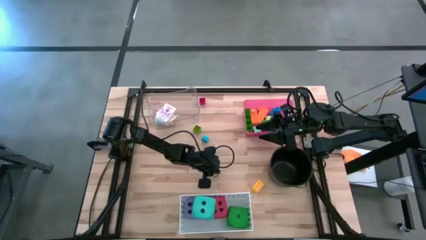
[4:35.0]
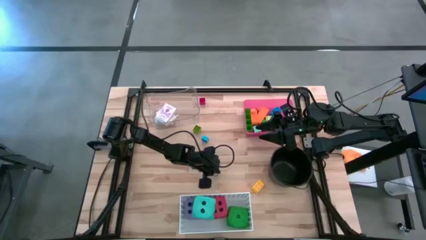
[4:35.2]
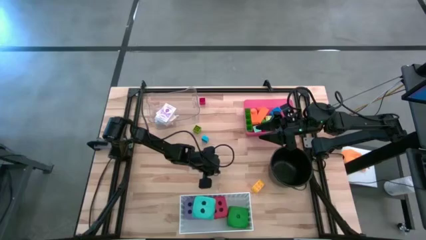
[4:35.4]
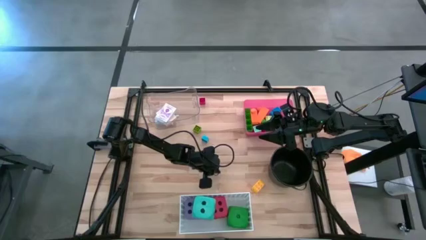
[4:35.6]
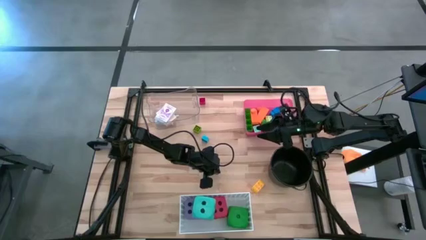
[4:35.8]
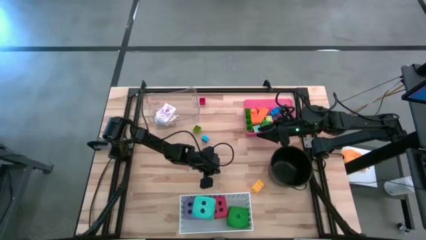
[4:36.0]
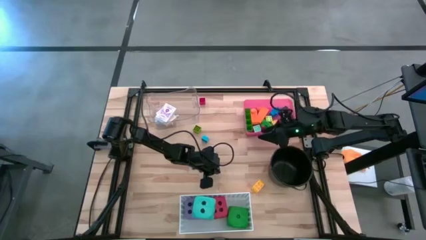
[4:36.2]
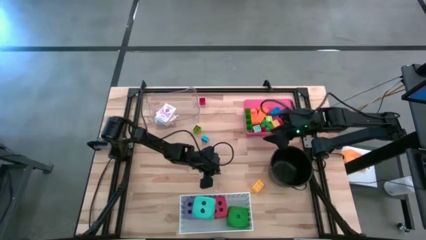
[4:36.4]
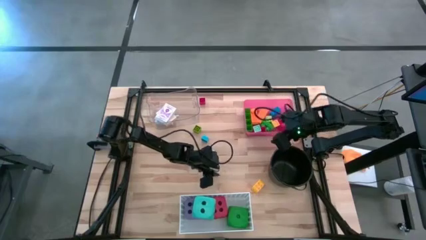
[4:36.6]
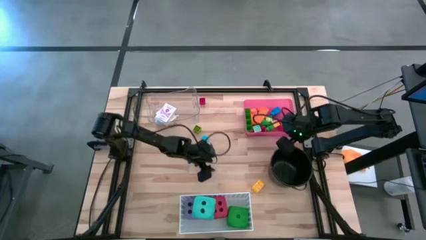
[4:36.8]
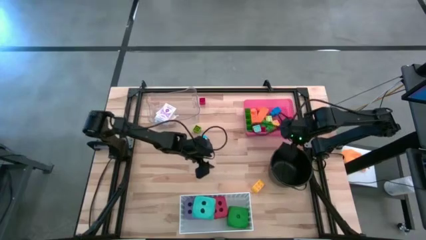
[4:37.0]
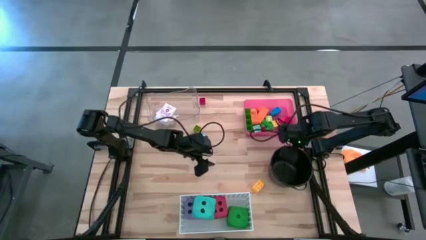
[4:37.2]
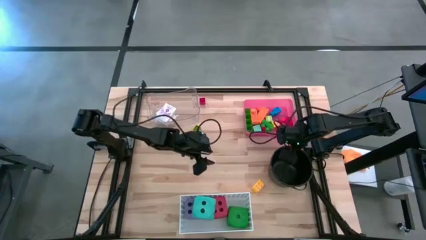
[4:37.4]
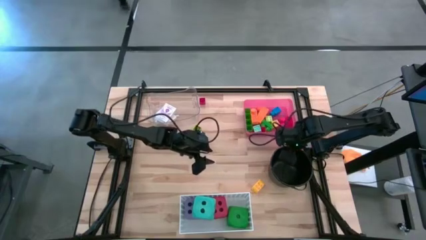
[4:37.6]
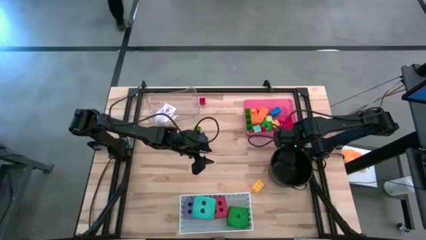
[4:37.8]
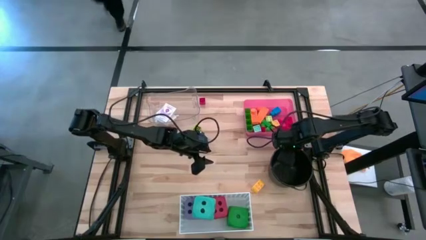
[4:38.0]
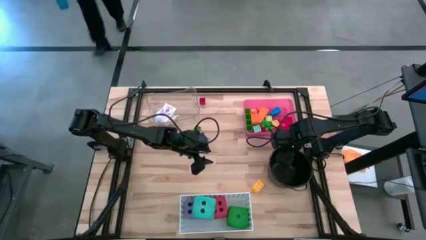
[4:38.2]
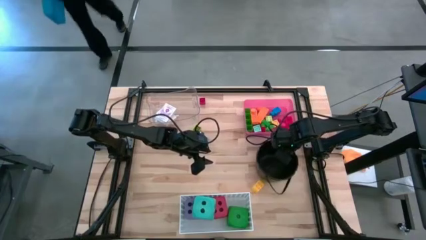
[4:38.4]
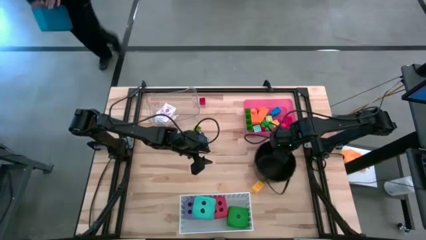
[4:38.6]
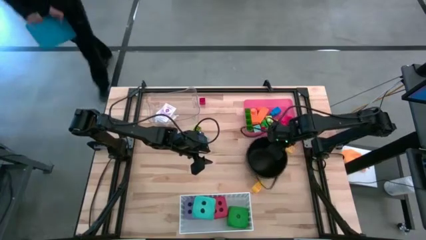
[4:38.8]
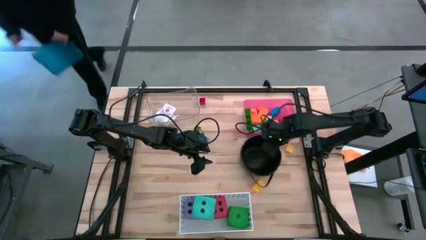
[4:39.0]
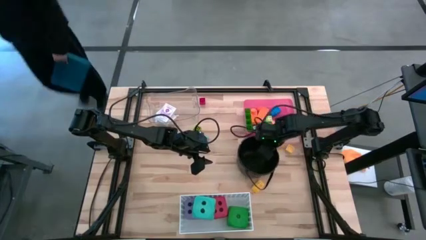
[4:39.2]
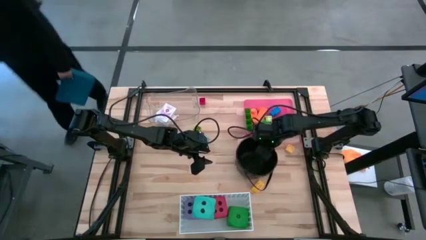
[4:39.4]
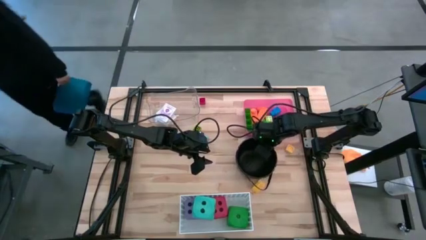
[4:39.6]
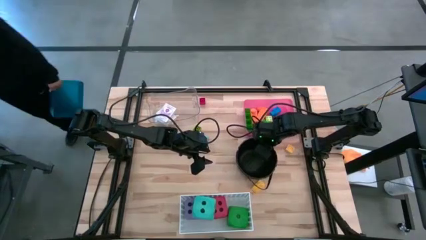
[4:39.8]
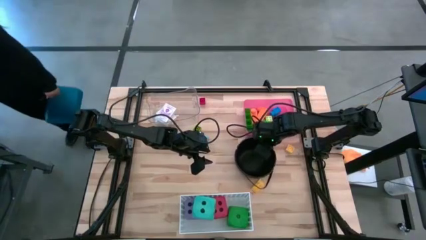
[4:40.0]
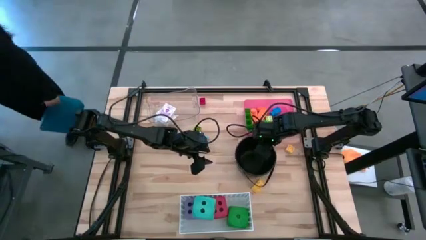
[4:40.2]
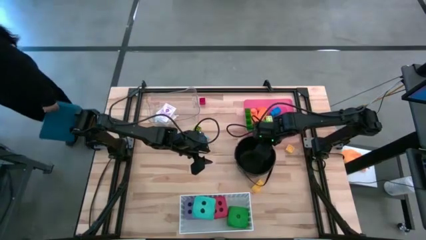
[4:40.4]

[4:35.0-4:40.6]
Task: Pick & Place Toys
Adjust the black bucket

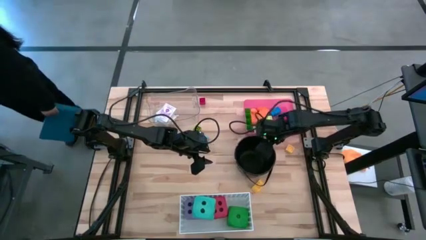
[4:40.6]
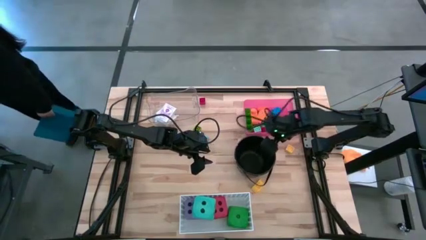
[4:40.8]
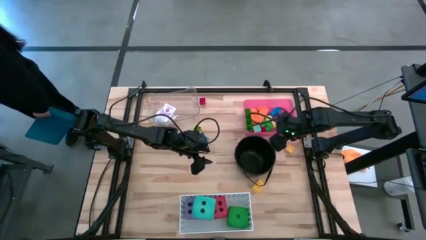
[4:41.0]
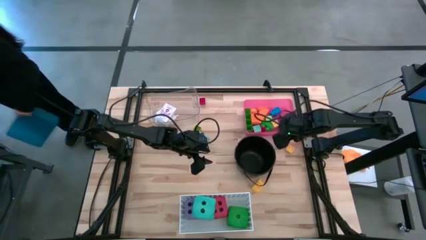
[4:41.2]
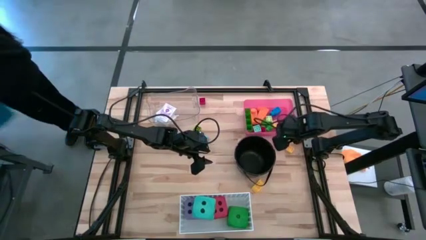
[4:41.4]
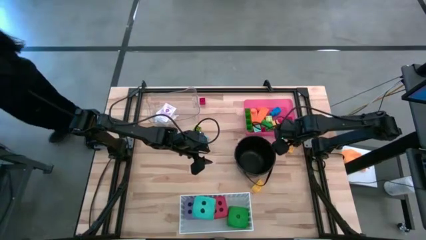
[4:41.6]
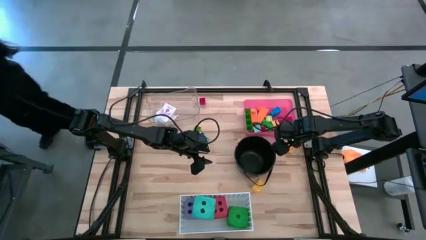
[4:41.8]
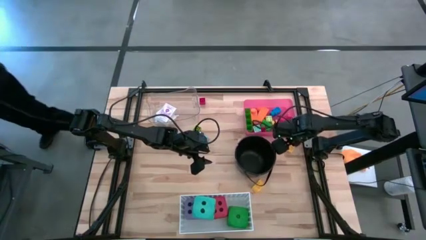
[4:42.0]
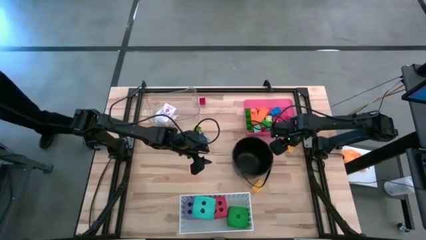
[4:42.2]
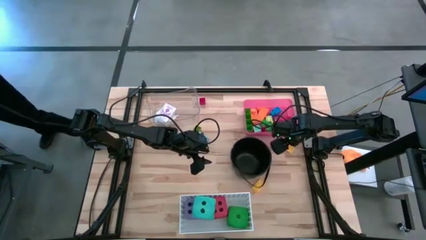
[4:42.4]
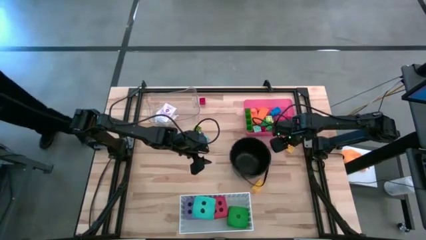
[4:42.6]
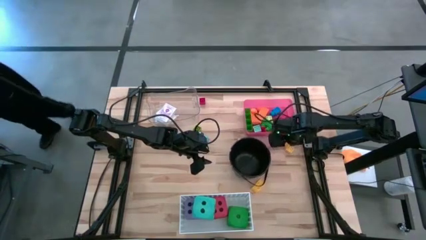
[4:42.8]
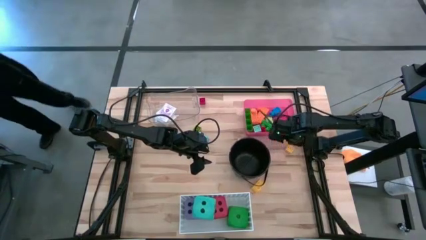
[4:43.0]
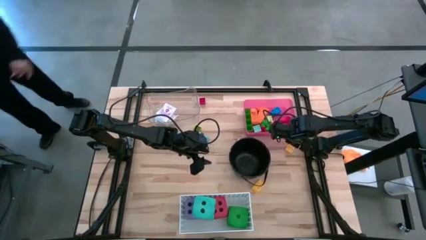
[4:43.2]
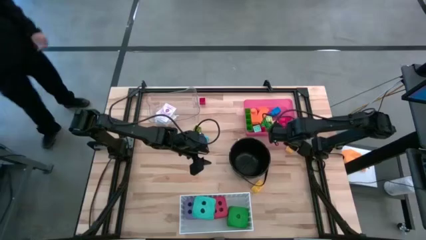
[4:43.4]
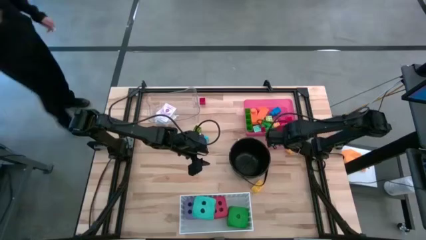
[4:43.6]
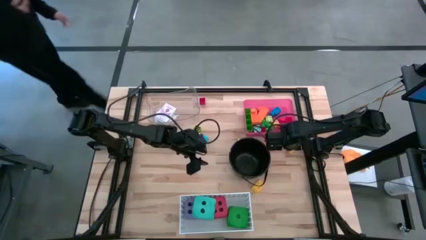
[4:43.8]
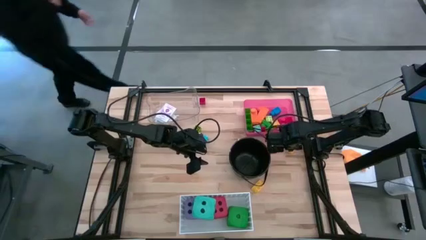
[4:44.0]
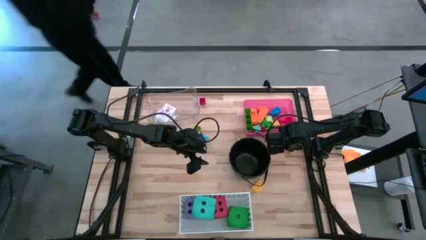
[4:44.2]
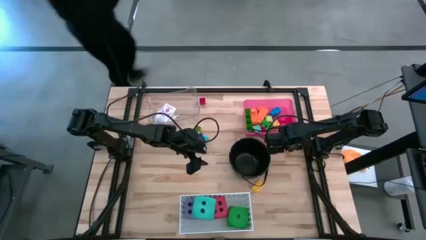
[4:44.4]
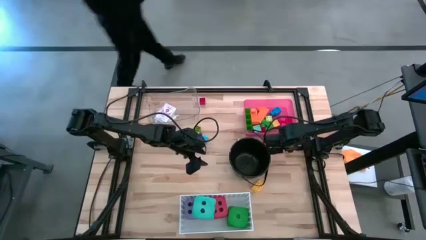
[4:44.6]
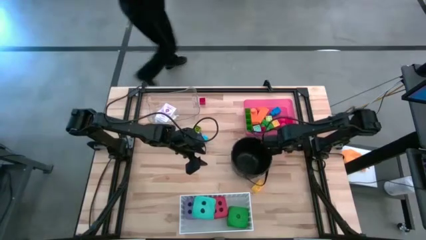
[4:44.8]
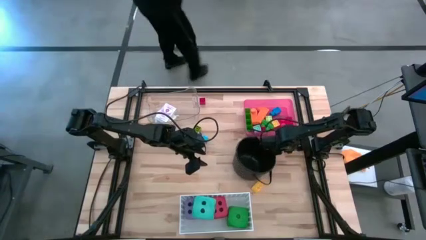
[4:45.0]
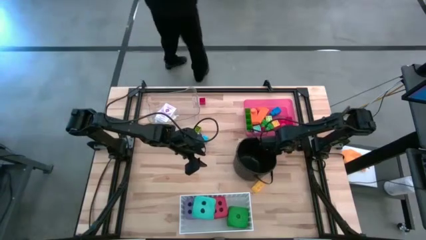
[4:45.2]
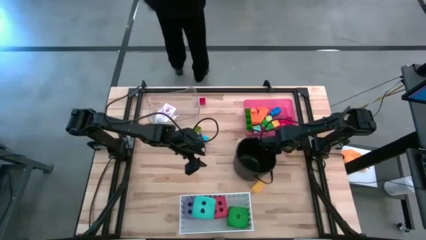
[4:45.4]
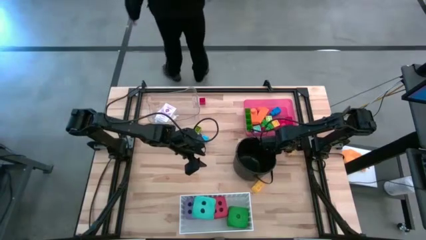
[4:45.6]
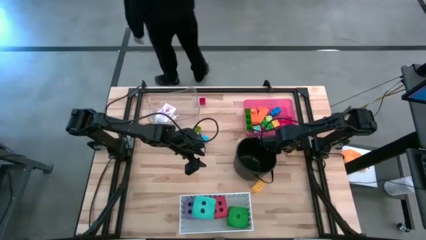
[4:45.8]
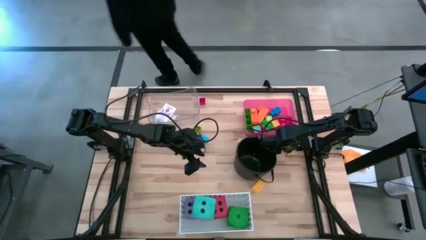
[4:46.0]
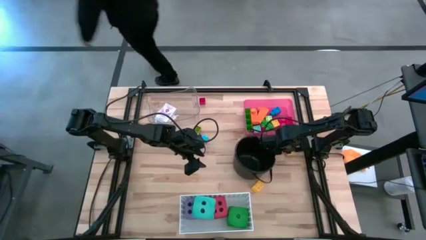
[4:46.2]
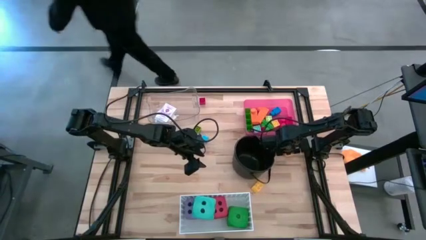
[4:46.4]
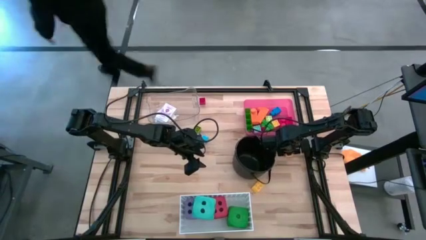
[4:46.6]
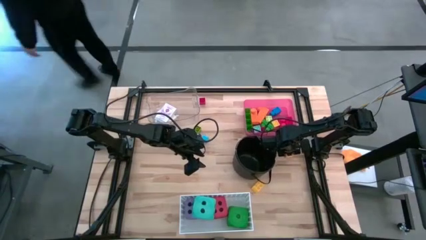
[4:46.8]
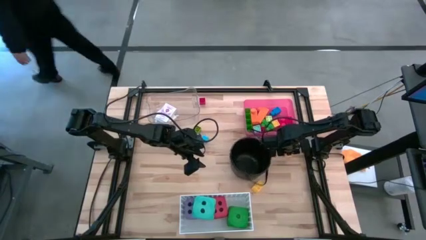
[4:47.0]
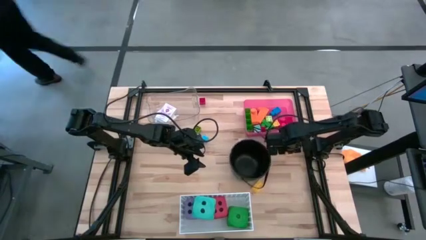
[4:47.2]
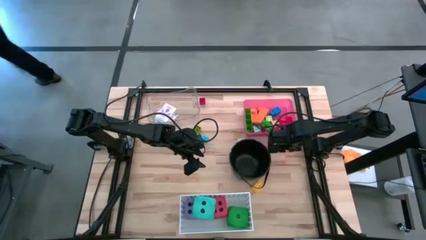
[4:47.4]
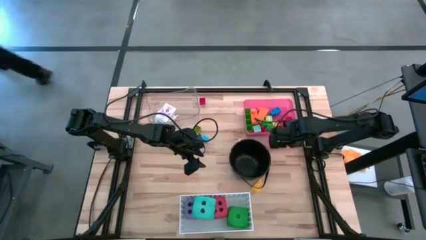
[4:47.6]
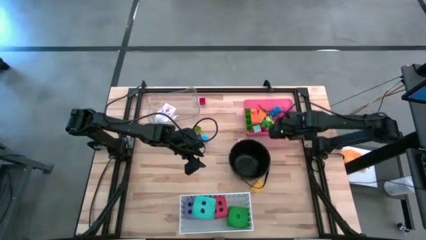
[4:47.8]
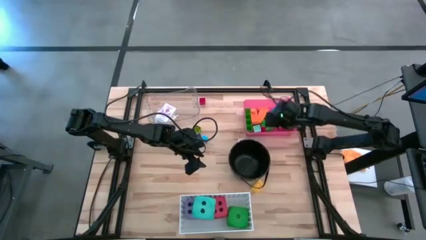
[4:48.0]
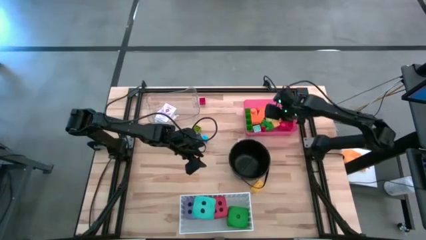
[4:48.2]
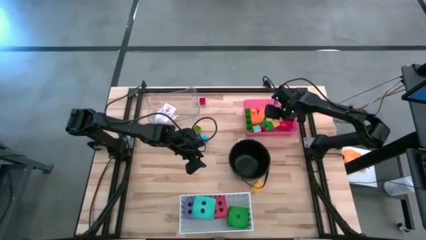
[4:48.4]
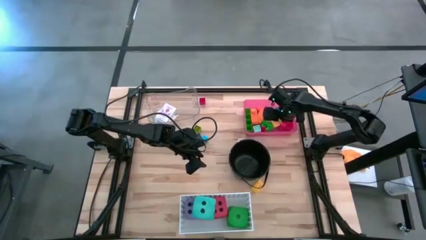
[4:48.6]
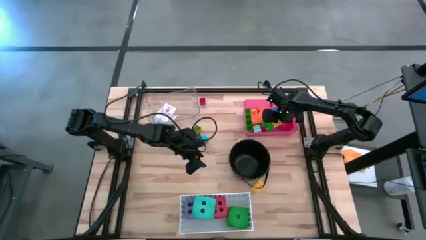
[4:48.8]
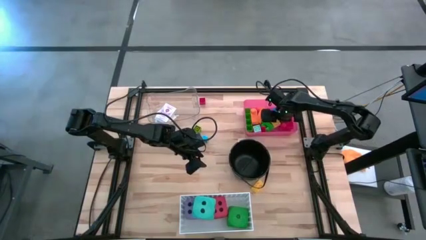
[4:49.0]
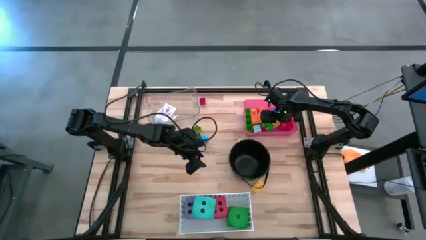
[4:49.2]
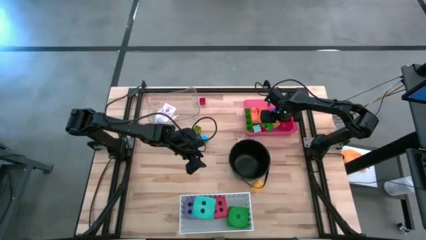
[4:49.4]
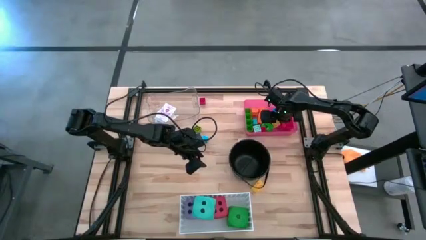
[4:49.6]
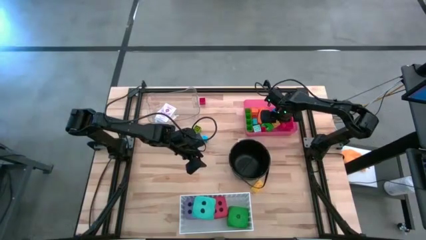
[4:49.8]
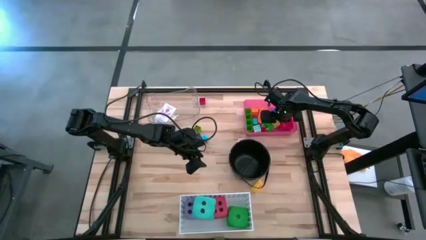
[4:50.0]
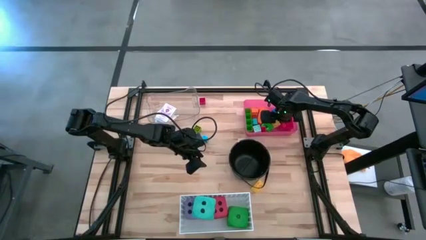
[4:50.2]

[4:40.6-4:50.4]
Put the yellow game piece into the red bin

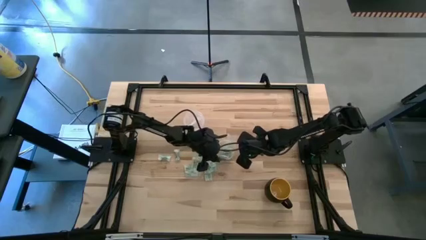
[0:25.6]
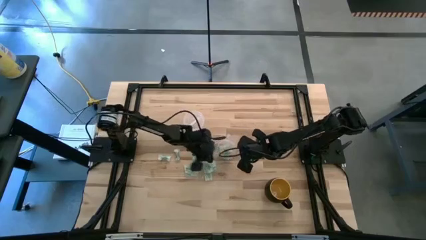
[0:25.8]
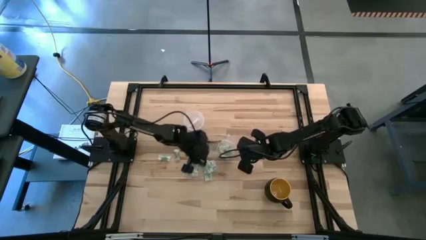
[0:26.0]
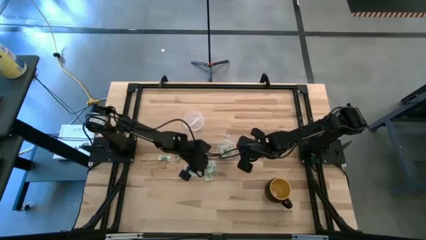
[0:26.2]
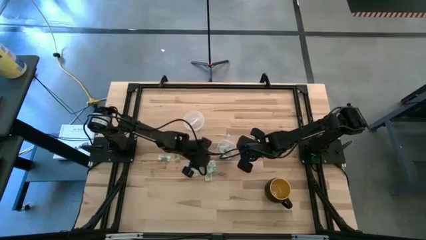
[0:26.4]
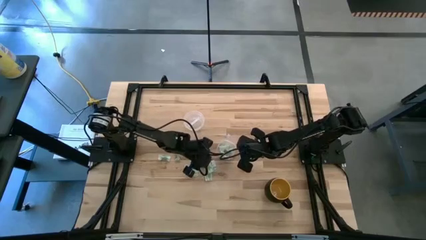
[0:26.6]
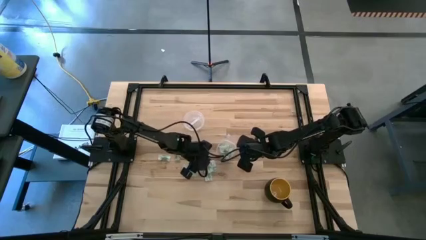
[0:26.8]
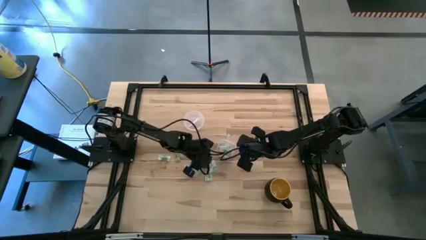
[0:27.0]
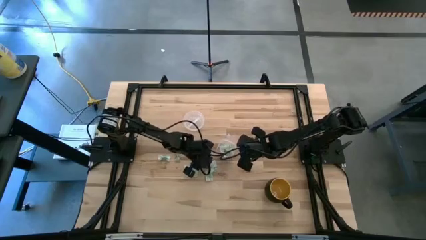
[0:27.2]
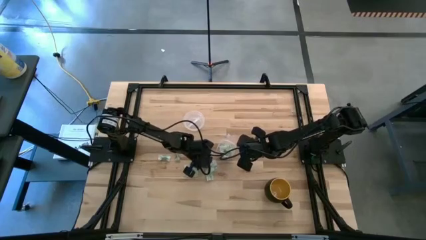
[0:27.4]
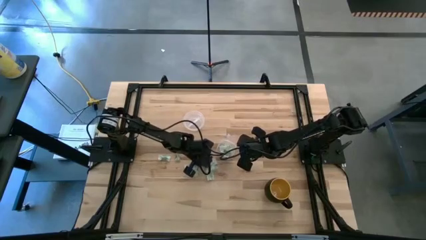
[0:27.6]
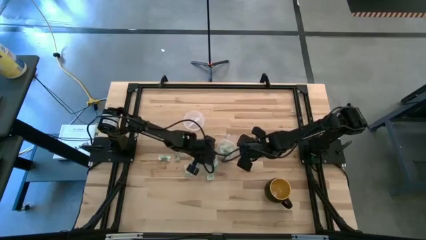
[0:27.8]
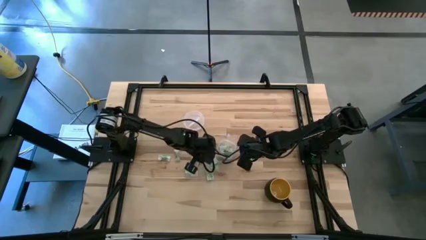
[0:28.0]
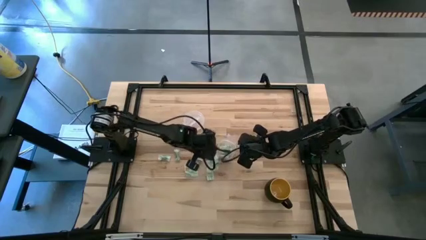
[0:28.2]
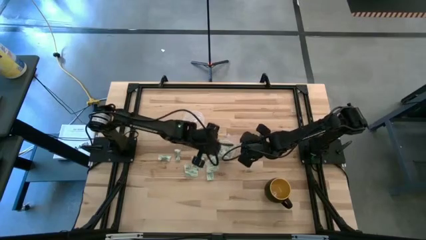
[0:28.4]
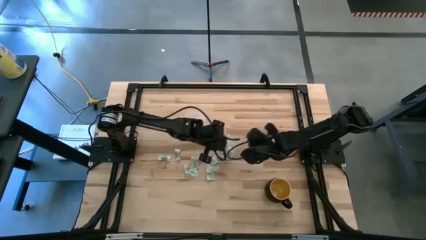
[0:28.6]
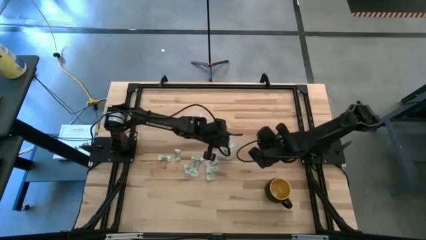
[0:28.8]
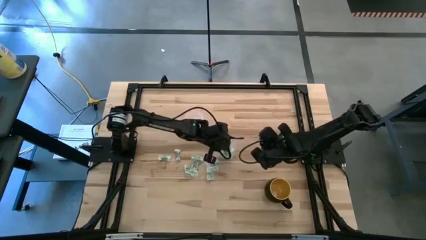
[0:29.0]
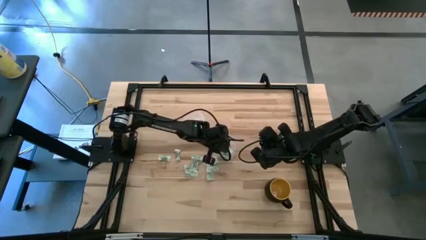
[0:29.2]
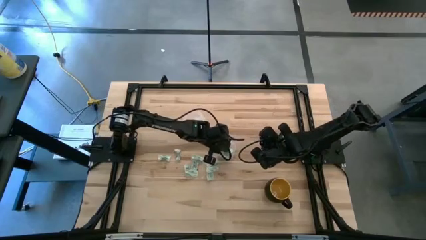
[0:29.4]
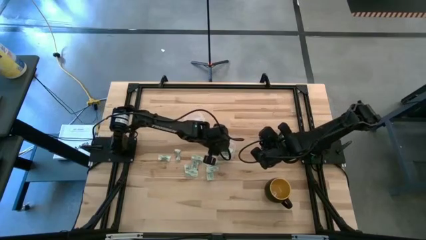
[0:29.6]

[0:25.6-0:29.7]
Task: Pick and place items into bin
Put the light green stevia packet into the transparent bin
